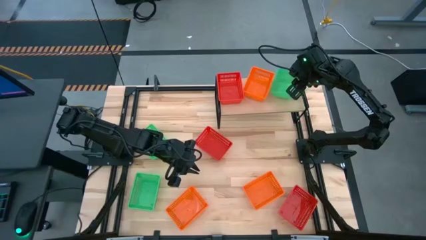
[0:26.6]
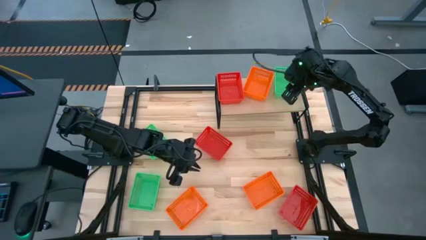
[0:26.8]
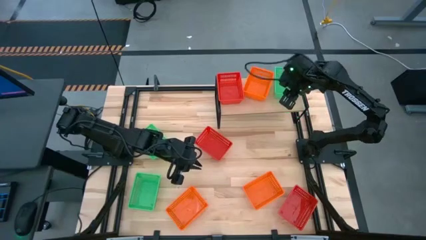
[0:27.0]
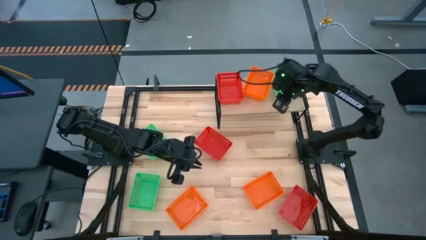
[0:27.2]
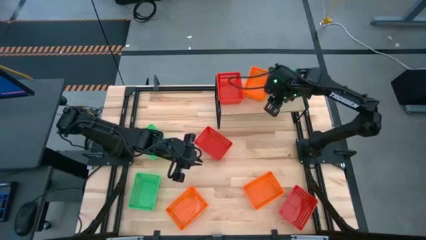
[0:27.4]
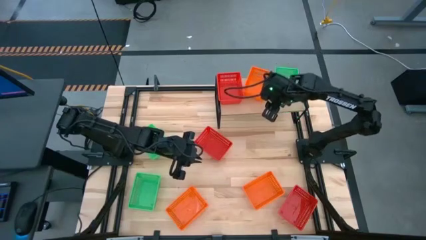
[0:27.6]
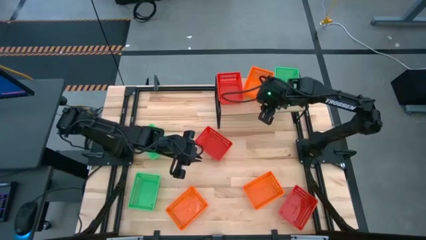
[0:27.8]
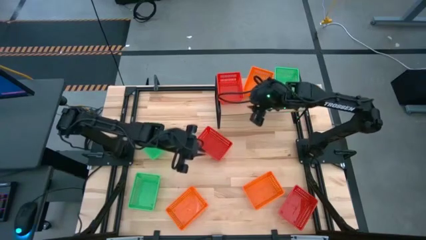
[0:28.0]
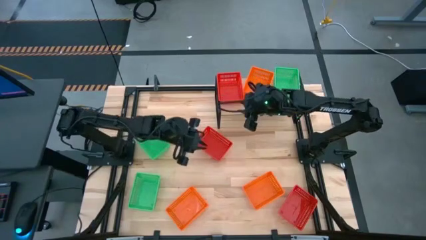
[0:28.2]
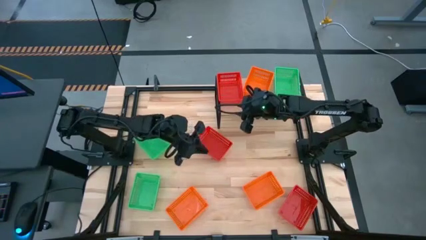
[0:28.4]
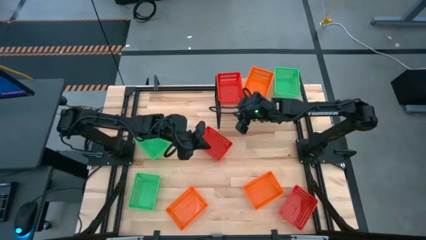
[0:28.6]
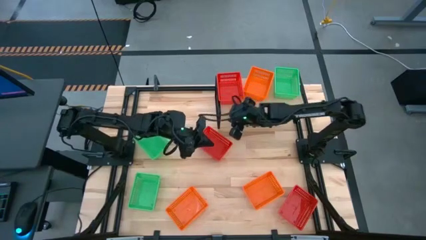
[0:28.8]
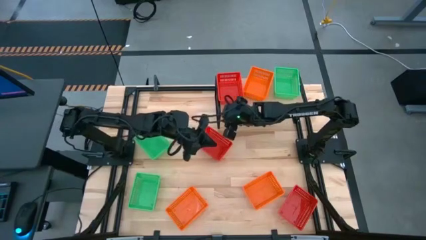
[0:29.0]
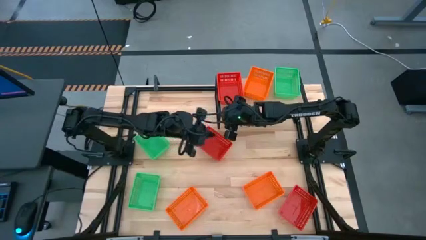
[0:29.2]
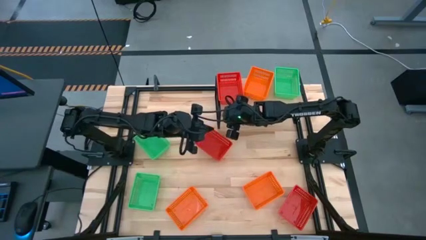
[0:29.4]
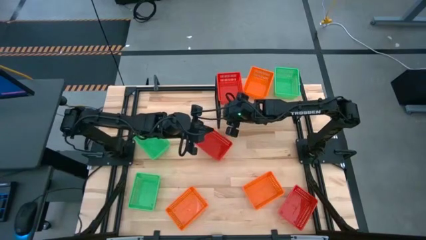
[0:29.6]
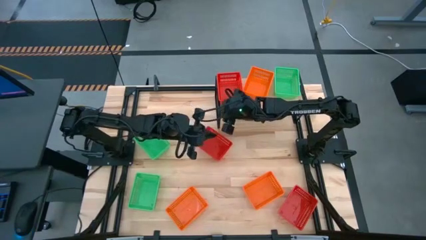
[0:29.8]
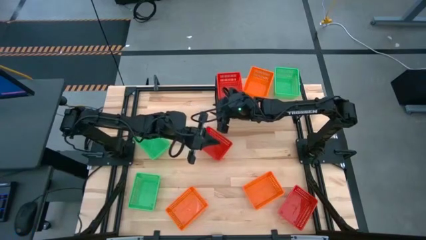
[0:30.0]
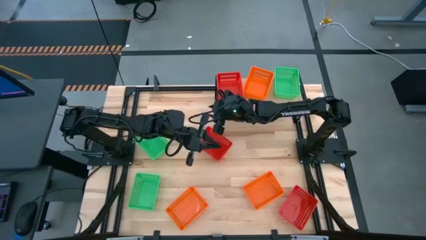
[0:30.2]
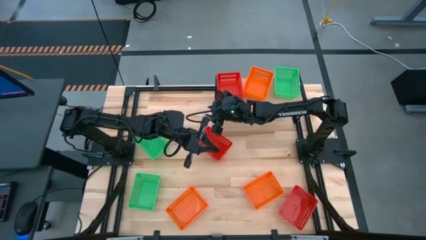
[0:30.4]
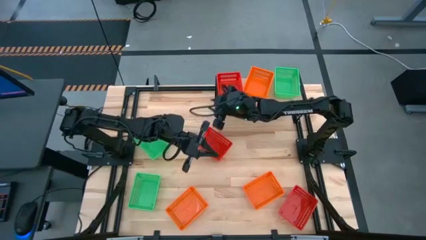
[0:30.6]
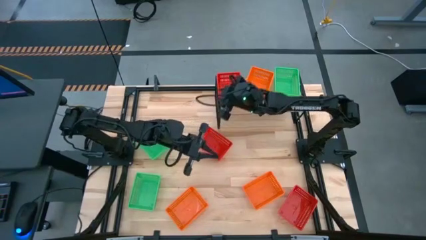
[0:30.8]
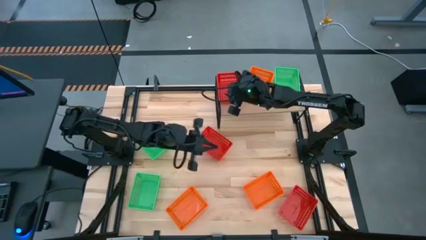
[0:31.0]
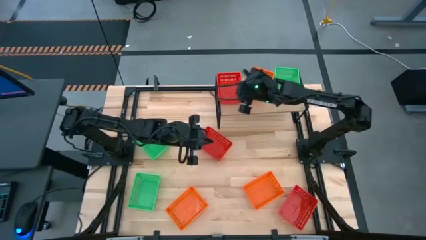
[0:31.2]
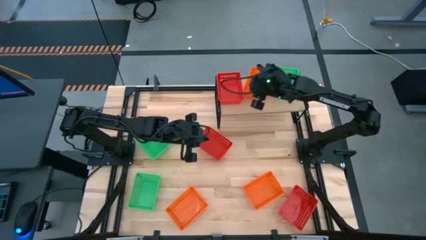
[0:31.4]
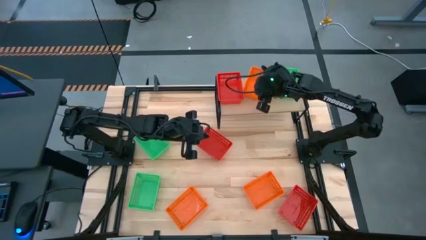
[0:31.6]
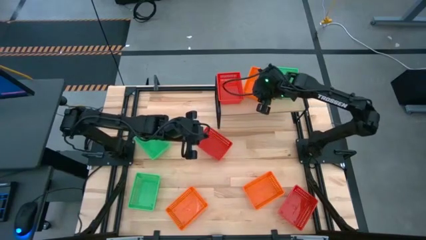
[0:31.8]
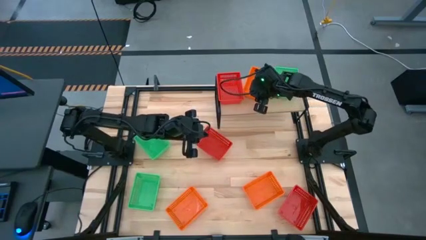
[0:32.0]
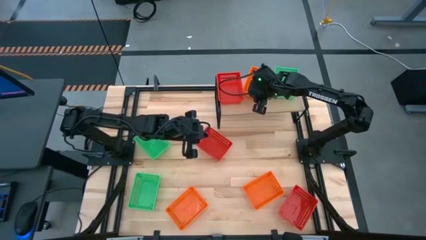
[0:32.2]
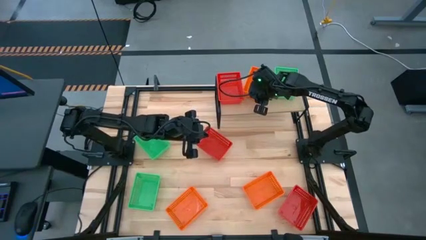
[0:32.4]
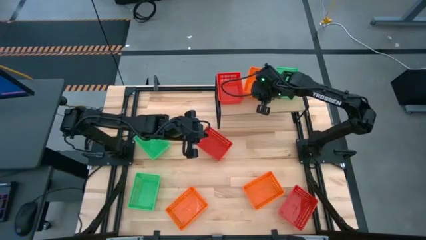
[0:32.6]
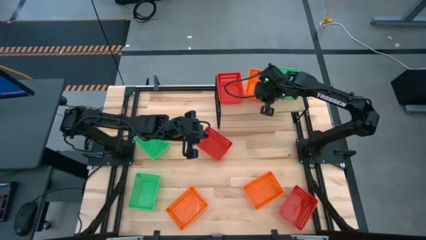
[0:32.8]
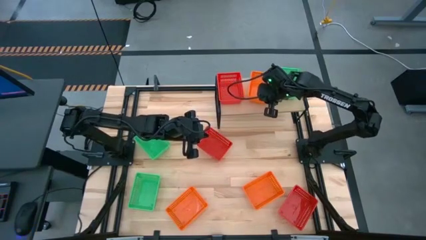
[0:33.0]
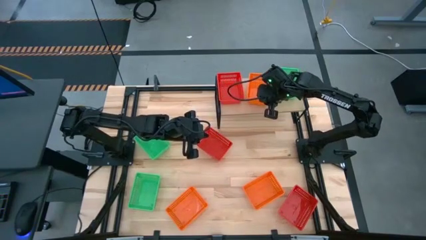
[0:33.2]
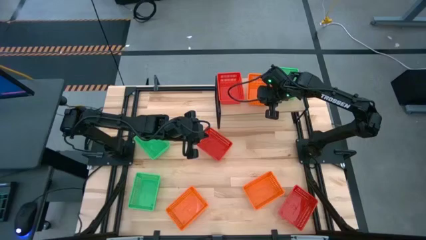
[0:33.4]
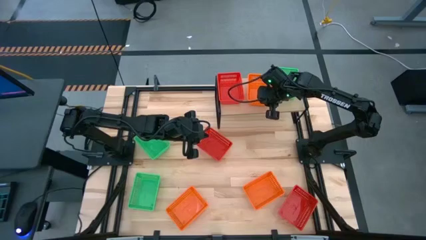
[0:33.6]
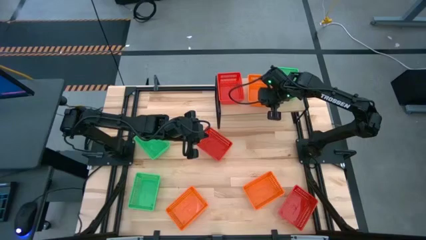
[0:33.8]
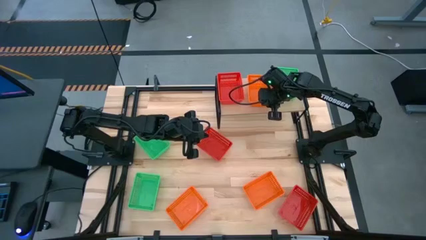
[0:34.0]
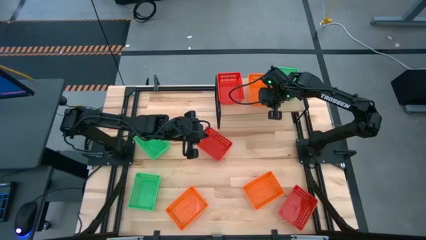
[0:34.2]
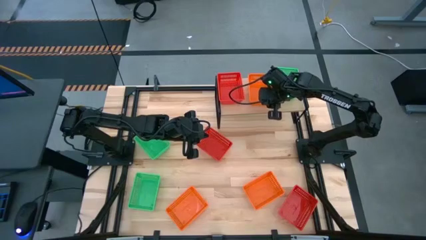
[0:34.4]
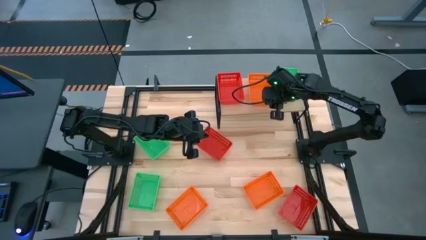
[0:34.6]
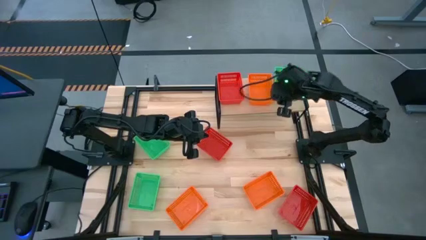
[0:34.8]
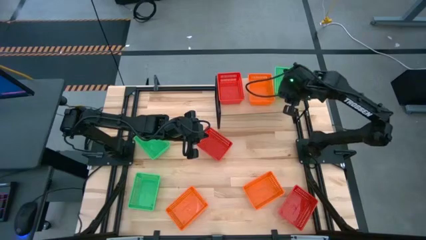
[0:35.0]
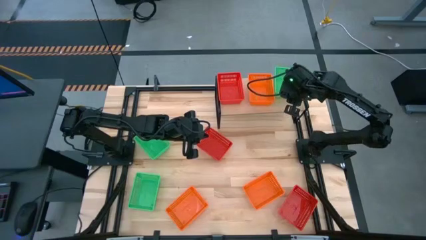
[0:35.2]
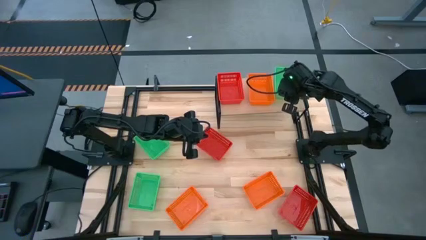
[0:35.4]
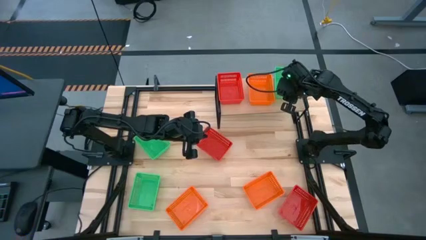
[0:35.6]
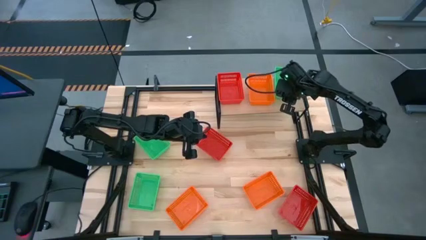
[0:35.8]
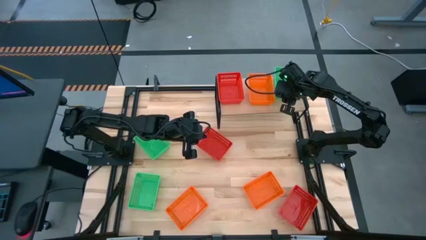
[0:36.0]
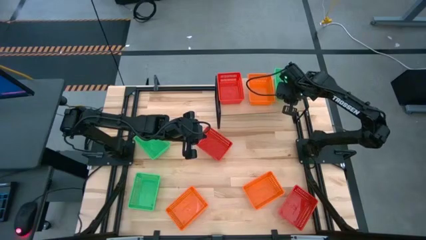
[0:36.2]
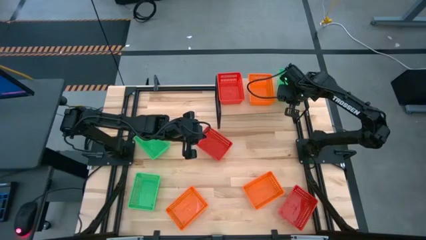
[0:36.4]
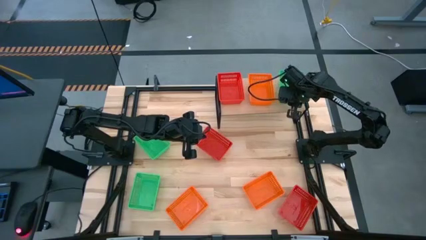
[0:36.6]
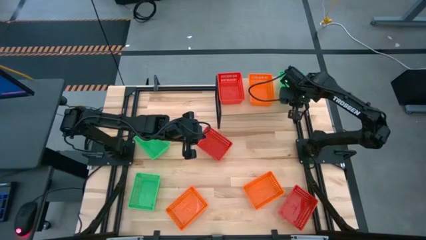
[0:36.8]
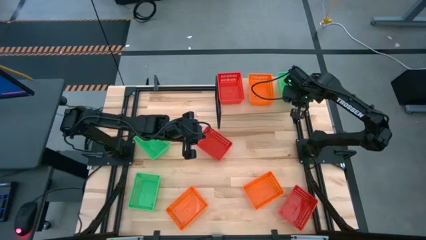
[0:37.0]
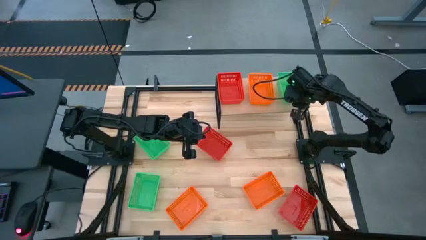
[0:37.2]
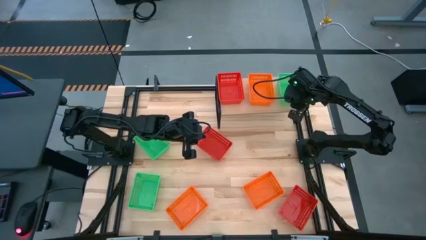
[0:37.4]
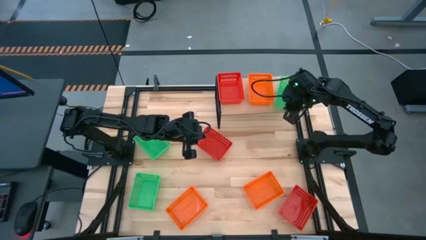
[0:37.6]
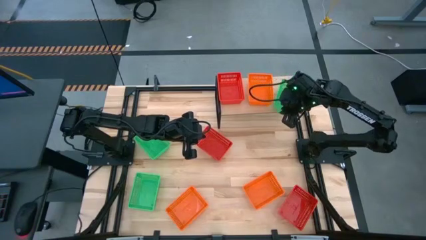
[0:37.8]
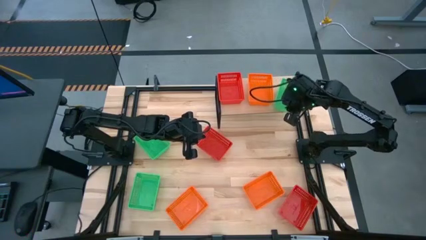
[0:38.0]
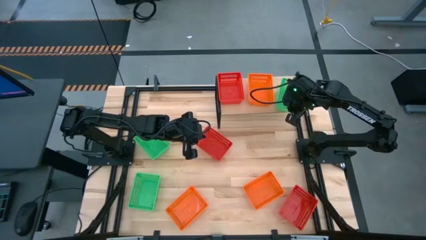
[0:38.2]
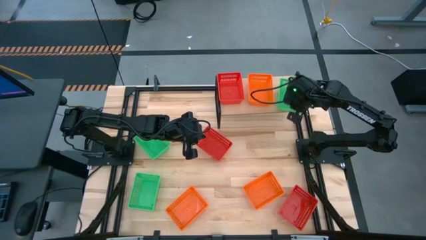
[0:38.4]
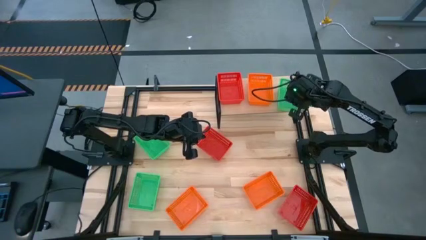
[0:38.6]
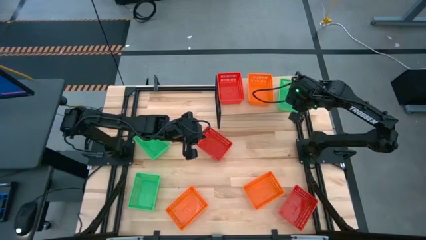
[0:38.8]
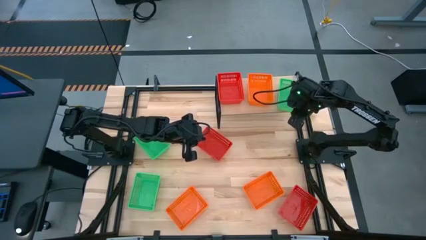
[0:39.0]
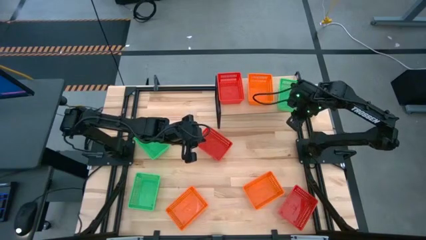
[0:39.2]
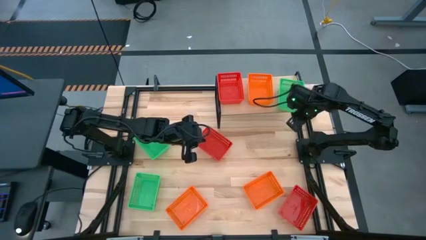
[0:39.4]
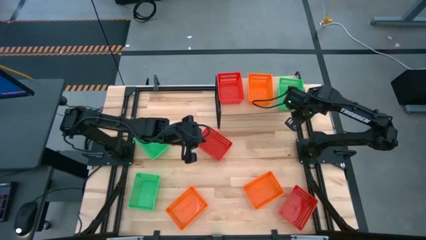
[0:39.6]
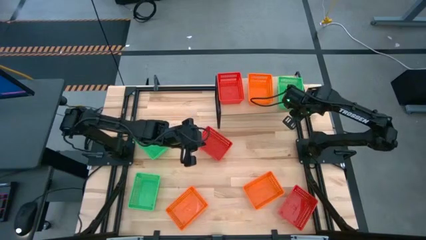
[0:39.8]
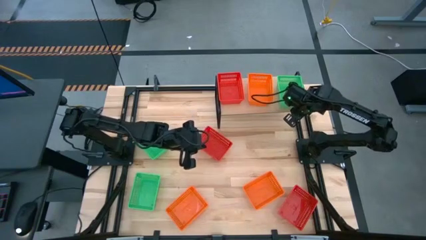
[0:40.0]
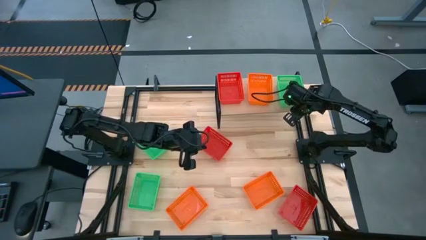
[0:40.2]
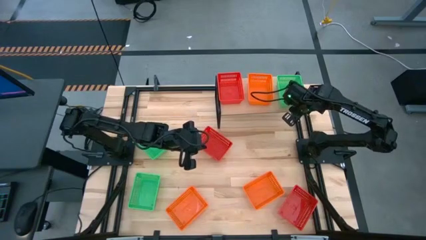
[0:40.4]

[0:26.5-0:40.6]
Task: Stack baskets on shelf by color
Adjust the bins on the shelf
